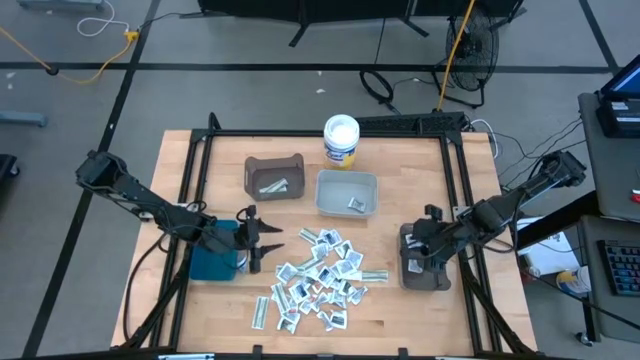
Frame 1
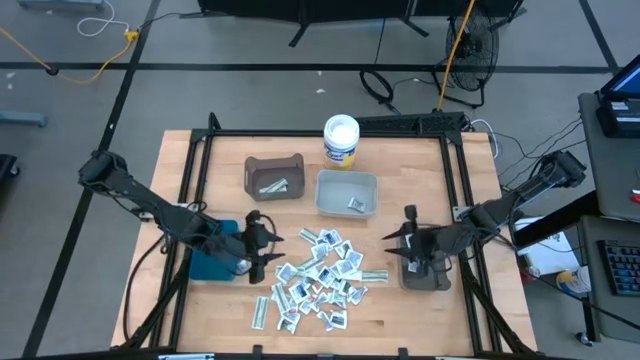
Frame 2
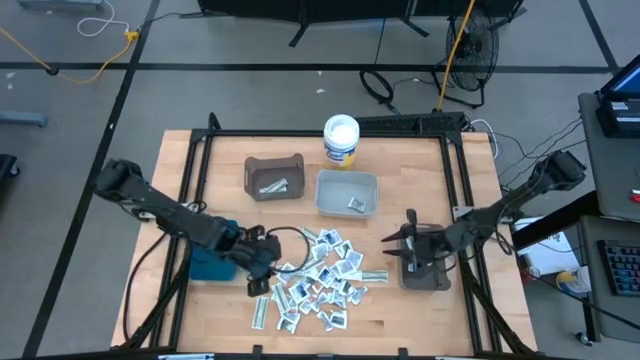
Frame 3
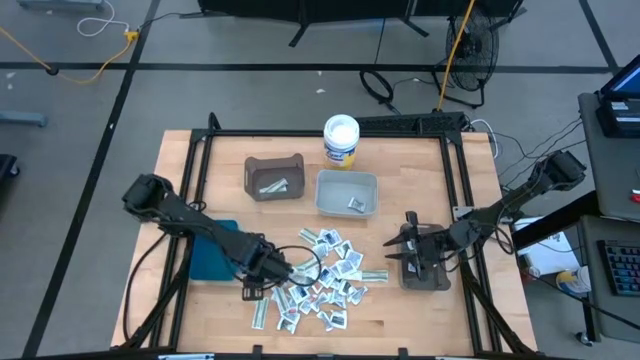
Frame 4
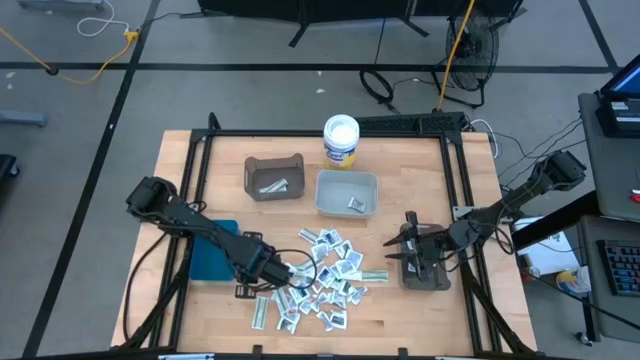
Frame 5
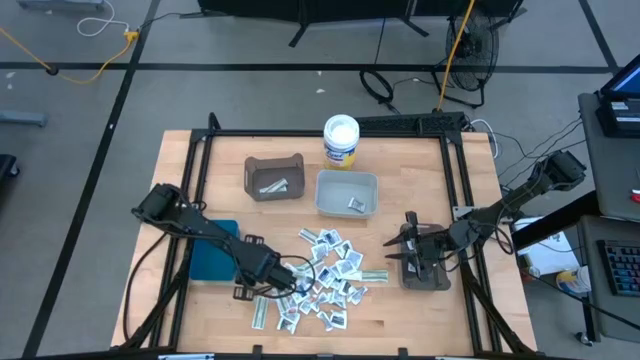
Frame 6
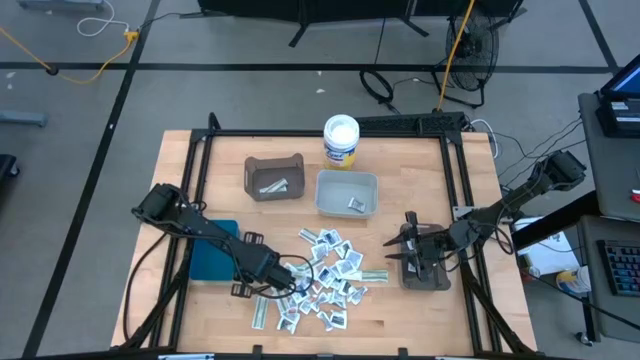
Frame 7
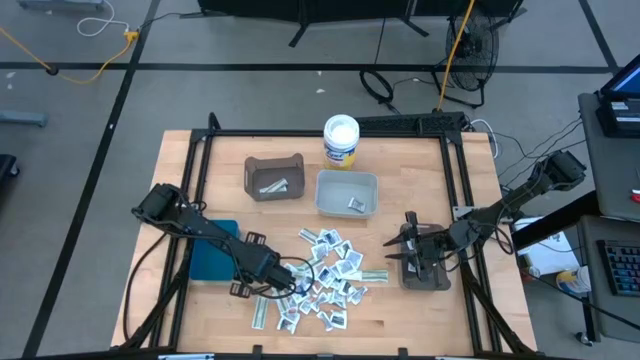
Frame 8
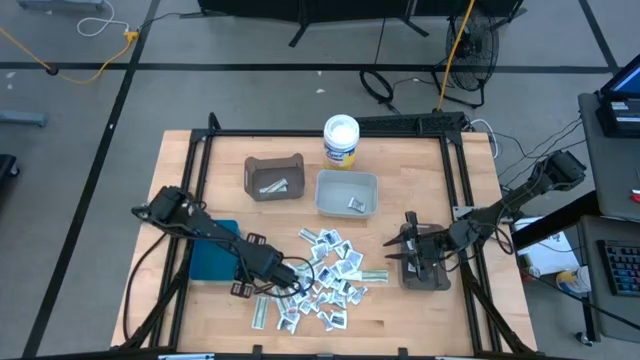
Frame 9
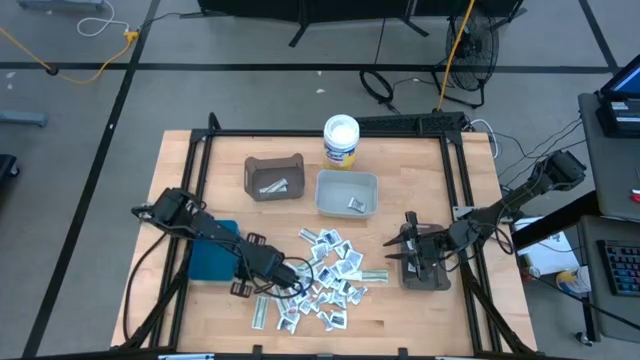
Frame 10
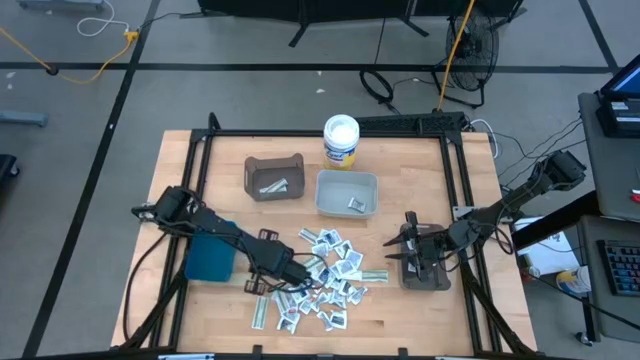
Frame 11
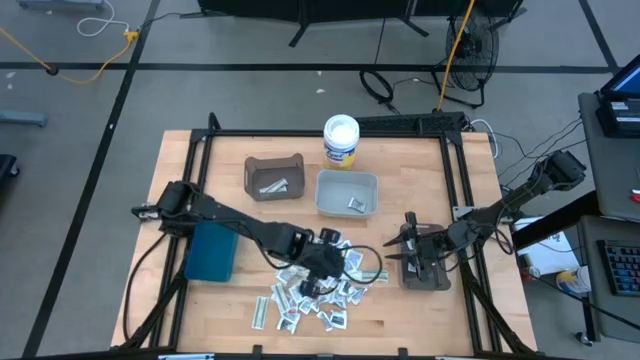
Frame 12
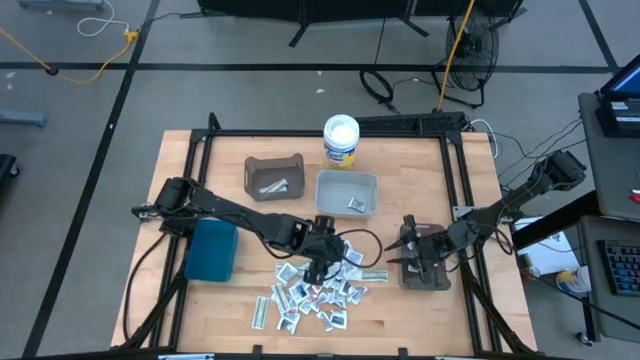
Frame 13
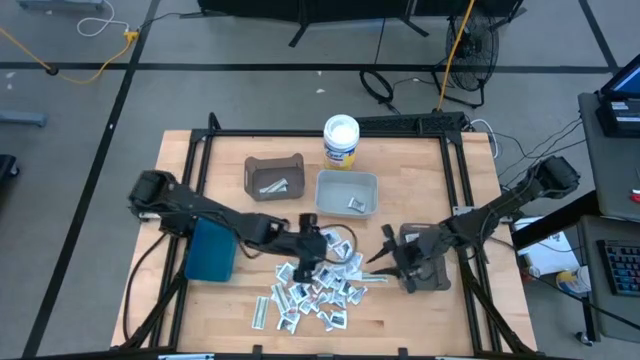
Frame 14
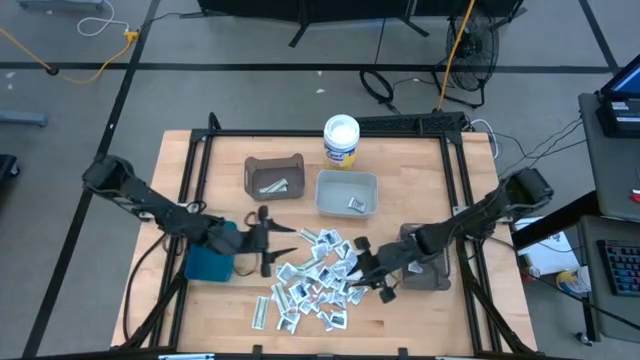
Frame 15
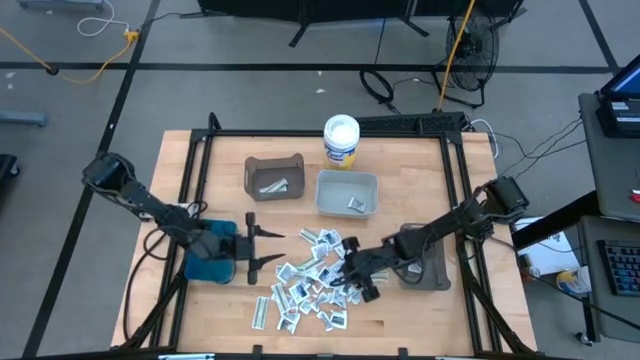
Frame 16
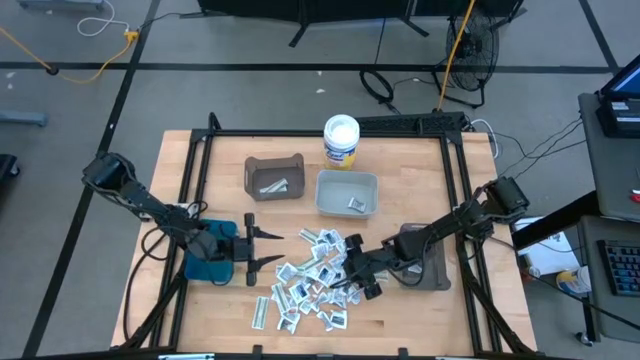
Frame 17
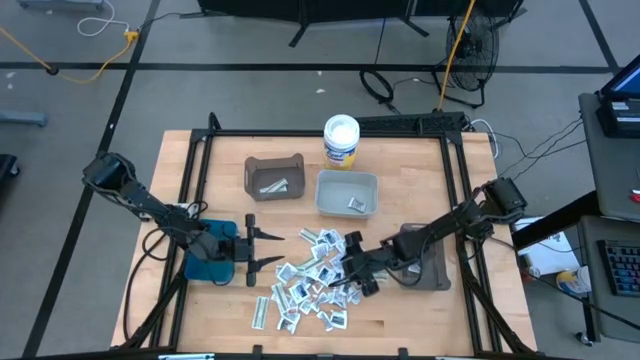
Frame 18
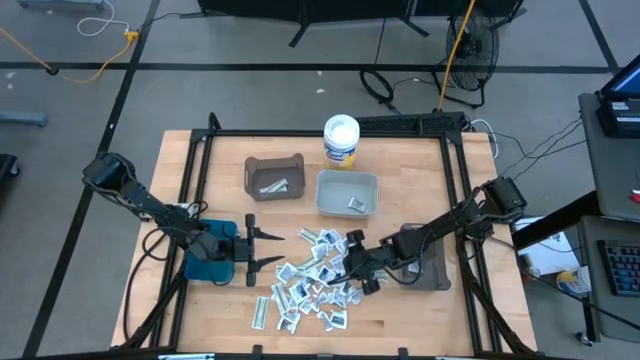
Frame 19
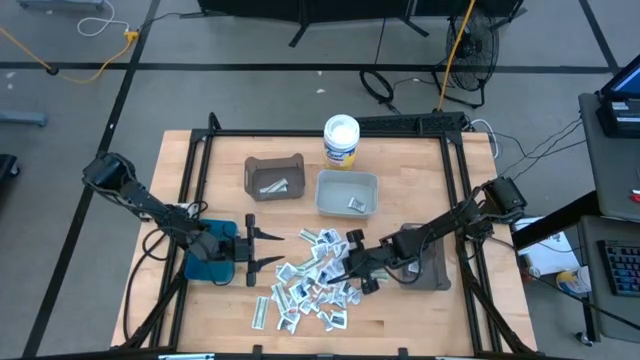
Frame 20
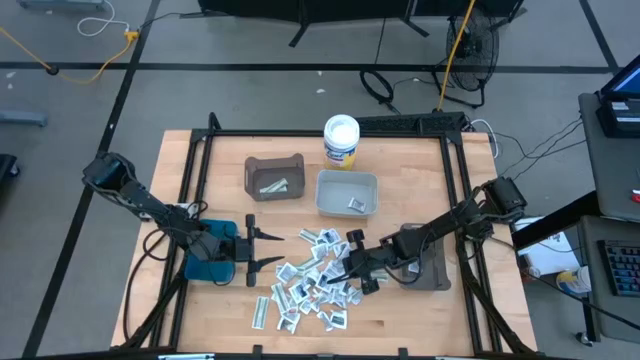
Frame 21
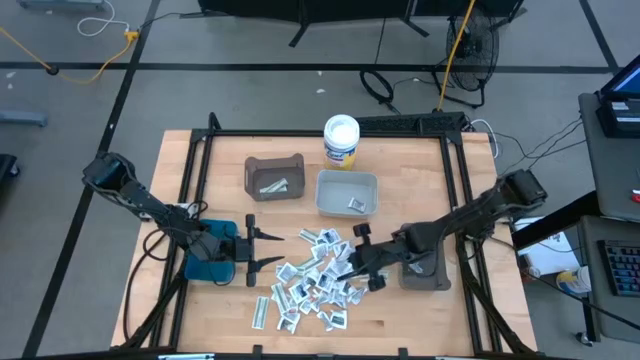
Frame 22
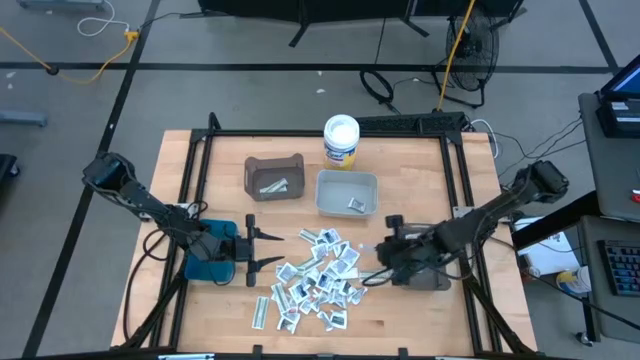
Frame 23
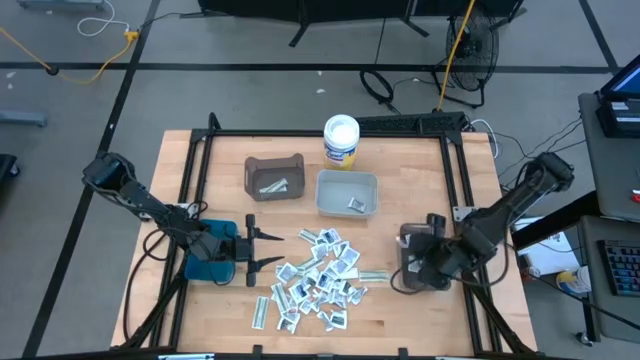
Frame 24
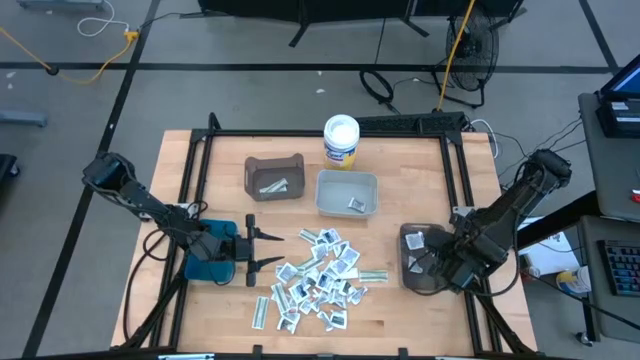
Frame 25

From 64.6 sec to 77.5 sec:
Task: Pick & Place First Aid Supplies
Put the blue alcohol pad into the bottom black bin

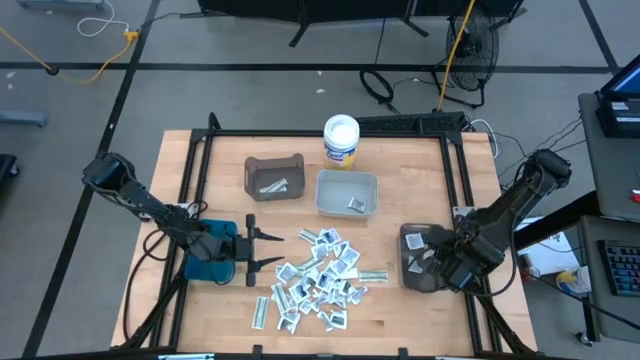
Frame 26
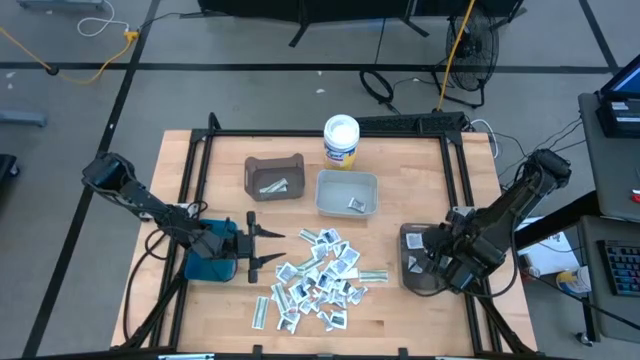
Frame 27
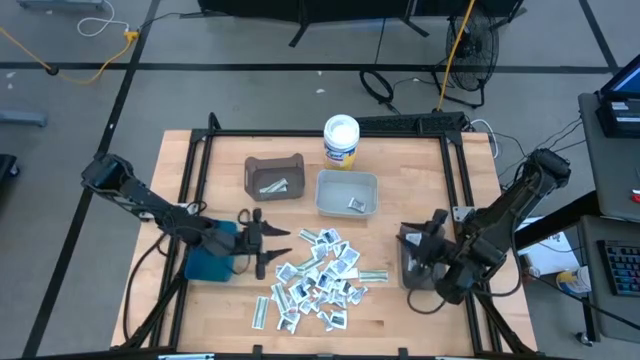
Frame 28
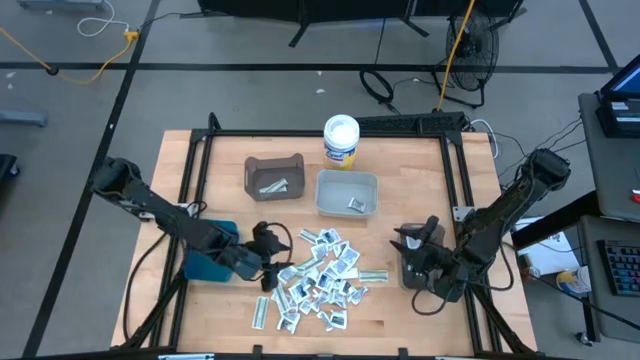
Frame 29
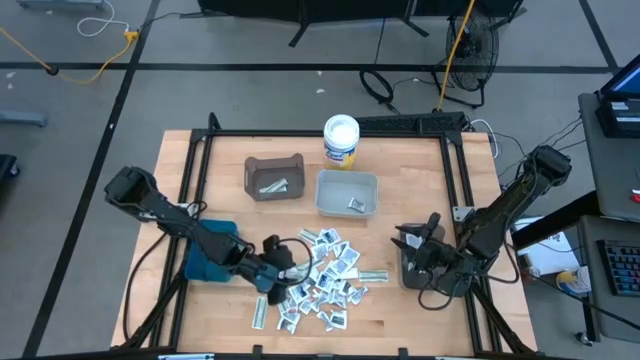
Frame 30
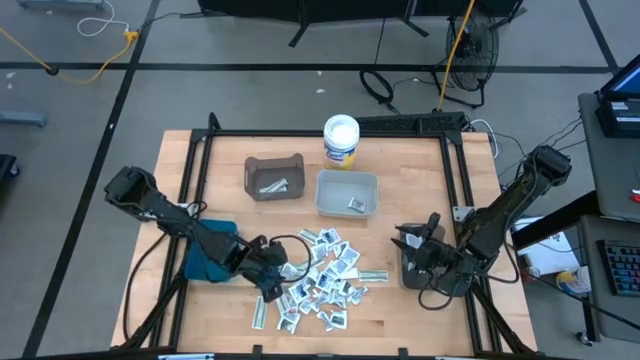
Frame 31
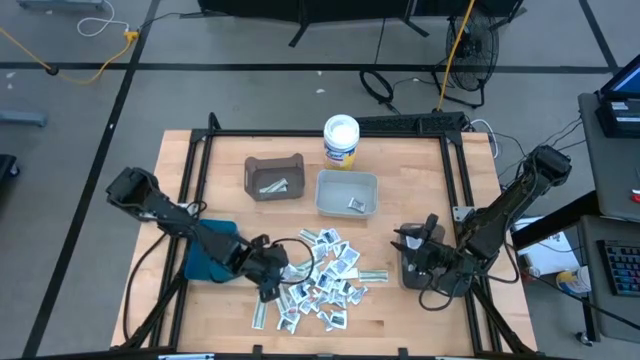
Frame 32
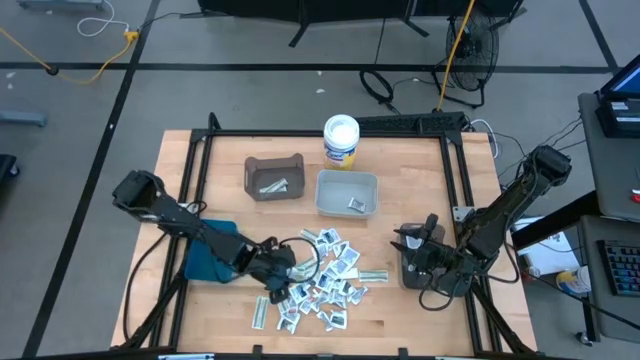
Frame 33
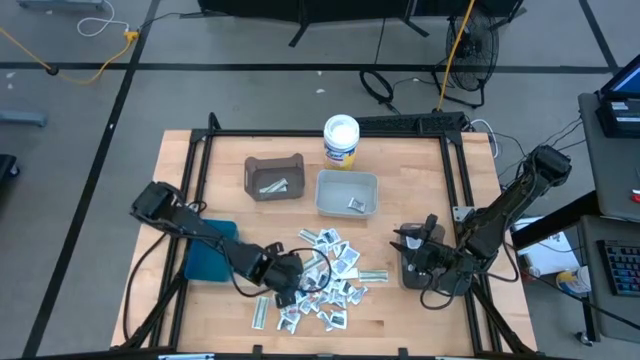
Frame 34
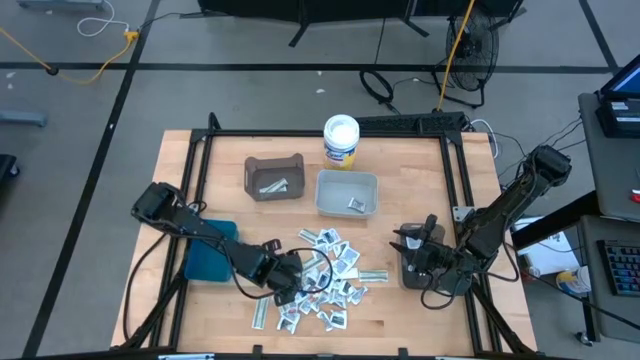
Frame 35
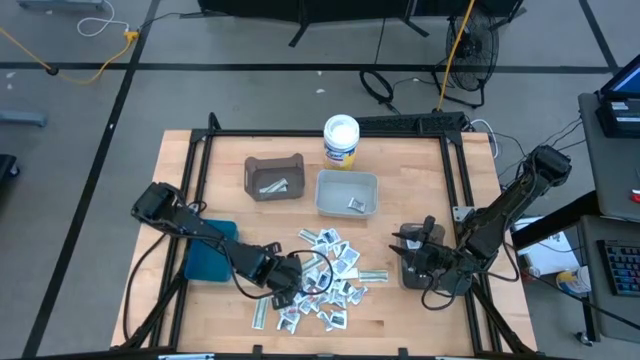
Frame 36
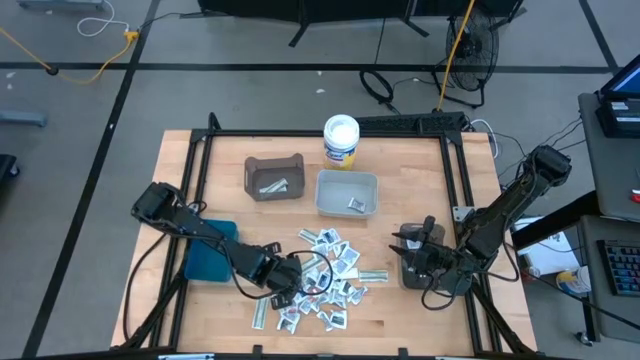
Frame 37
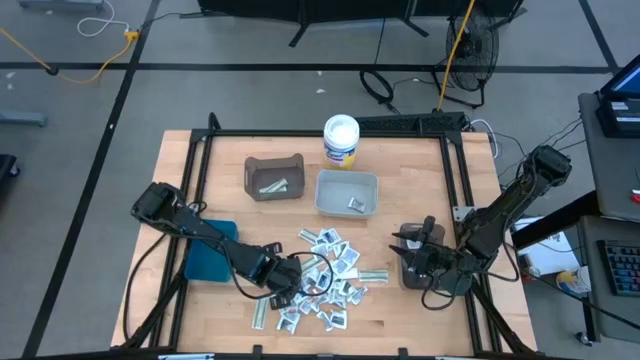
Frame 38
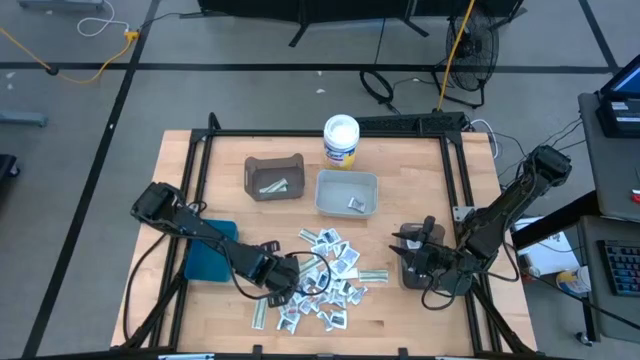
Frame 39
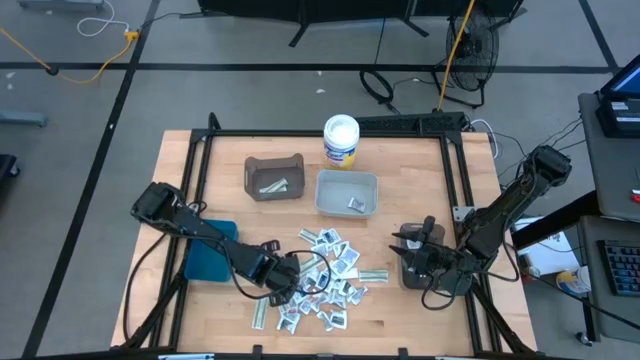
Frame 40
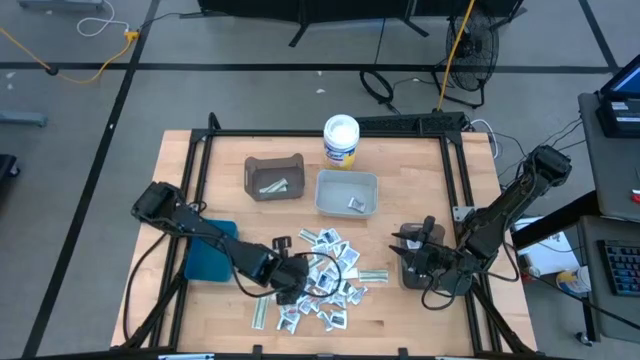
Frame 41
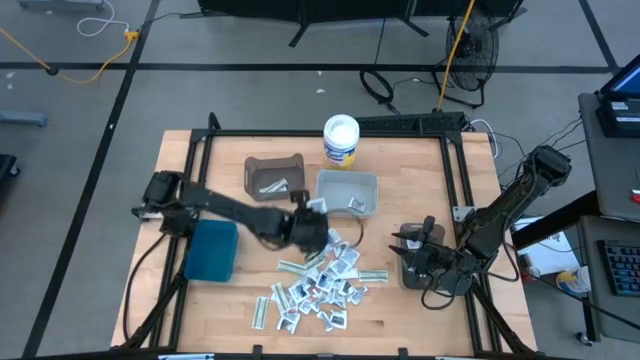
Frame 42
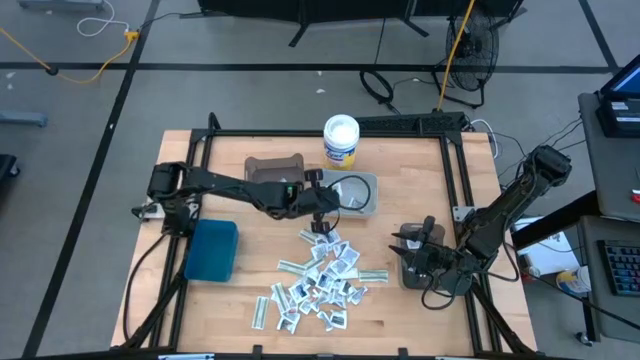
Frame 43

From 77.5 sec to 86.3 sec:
Put the gray towelette pack into the gray bin
